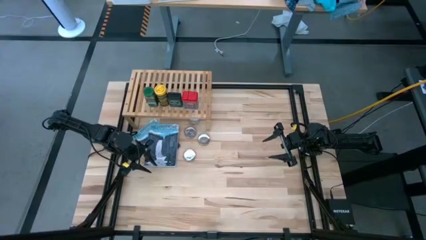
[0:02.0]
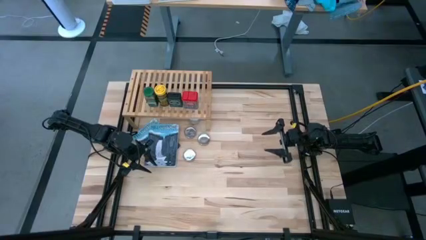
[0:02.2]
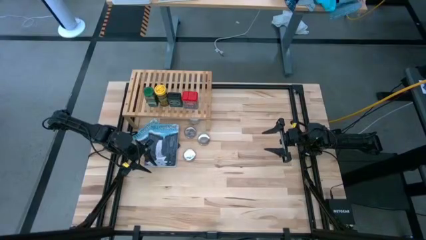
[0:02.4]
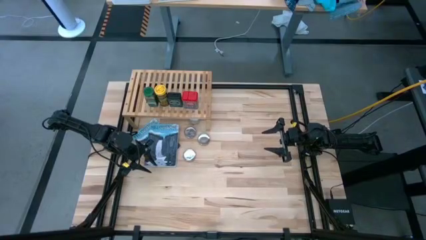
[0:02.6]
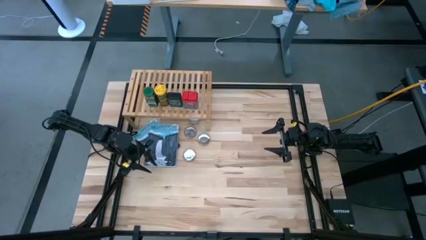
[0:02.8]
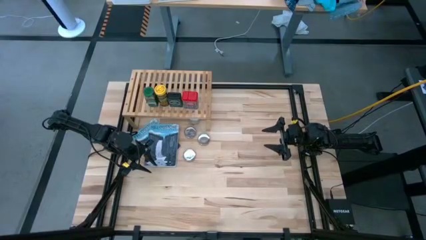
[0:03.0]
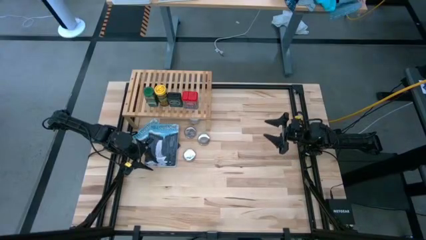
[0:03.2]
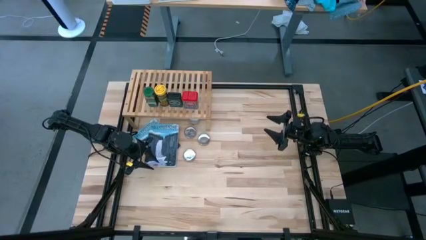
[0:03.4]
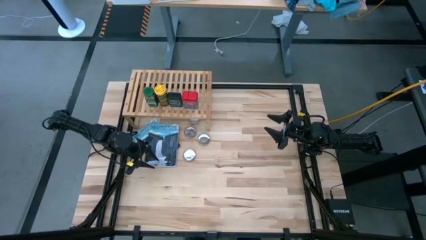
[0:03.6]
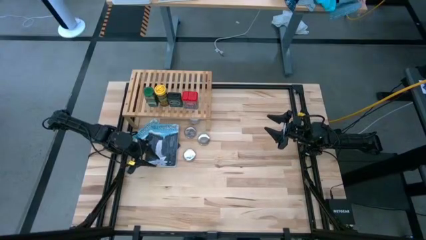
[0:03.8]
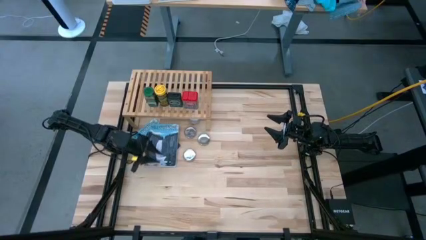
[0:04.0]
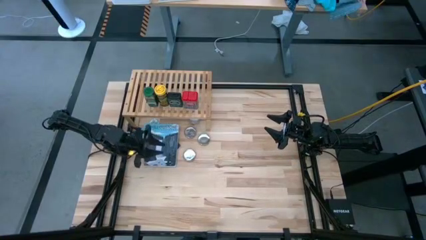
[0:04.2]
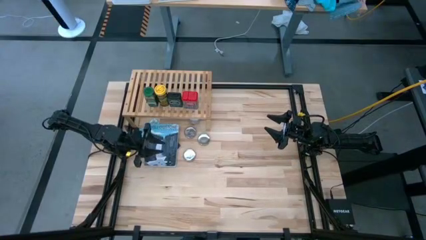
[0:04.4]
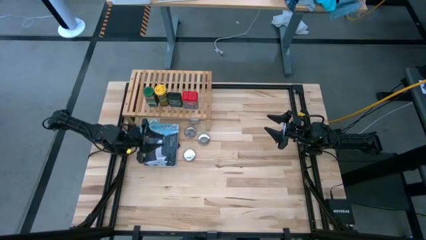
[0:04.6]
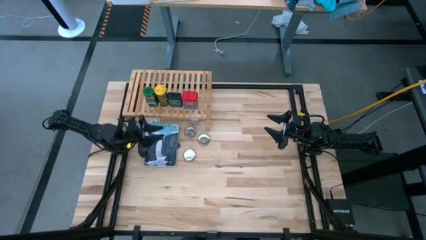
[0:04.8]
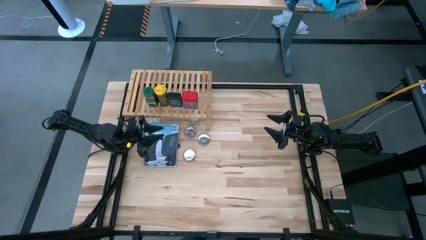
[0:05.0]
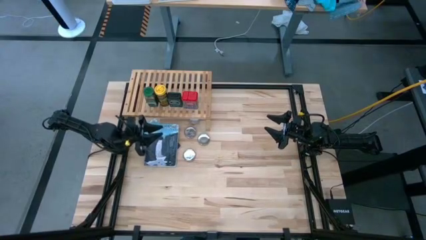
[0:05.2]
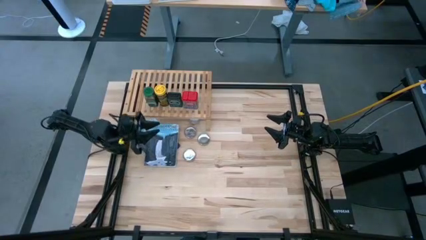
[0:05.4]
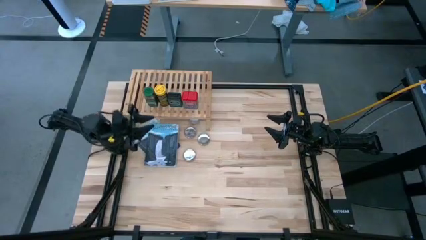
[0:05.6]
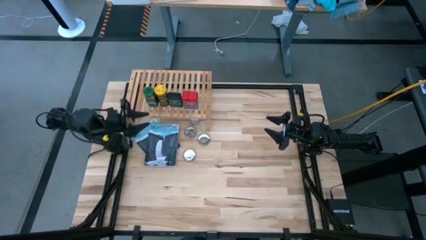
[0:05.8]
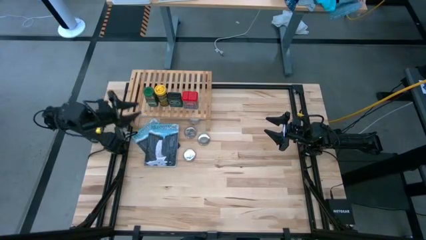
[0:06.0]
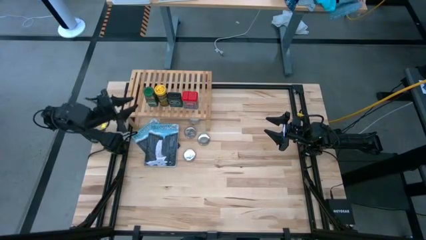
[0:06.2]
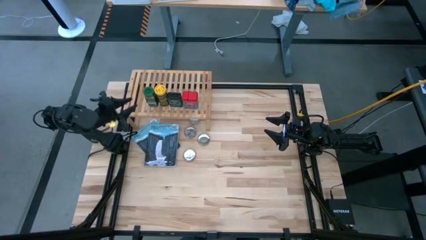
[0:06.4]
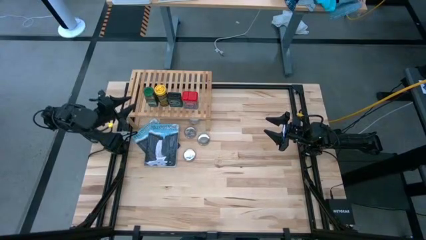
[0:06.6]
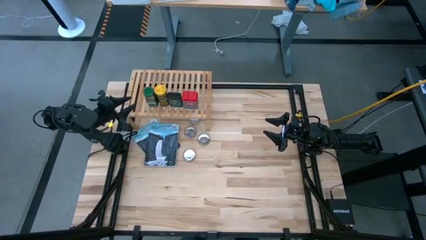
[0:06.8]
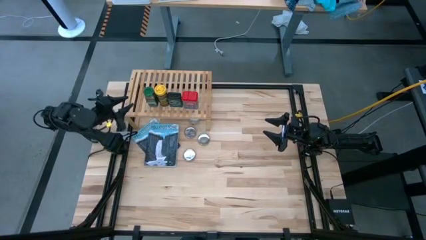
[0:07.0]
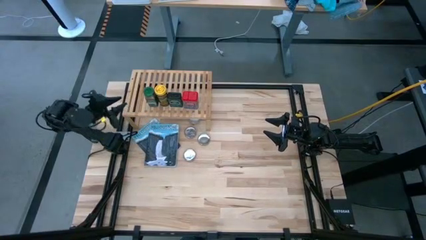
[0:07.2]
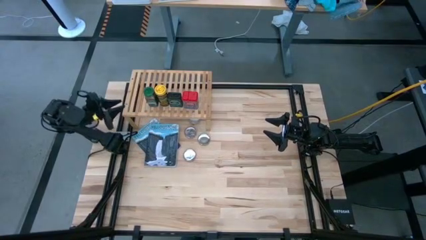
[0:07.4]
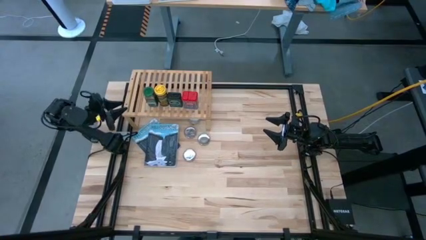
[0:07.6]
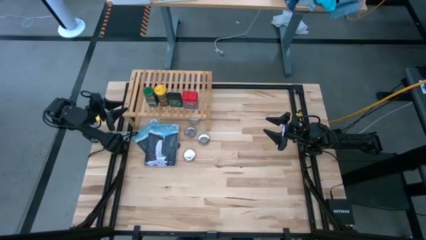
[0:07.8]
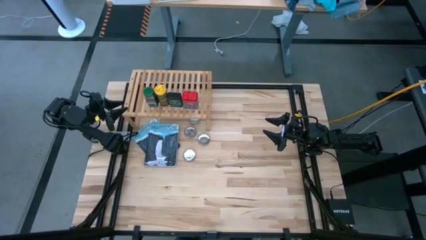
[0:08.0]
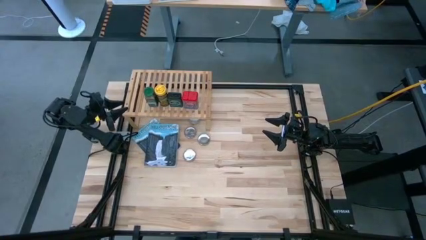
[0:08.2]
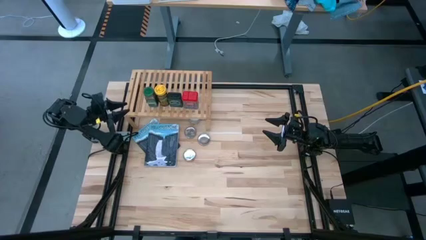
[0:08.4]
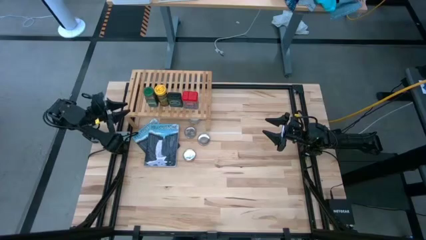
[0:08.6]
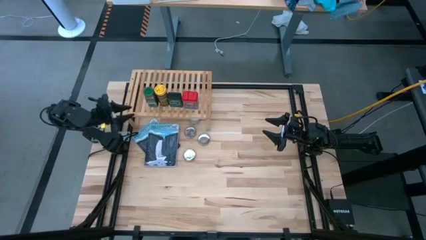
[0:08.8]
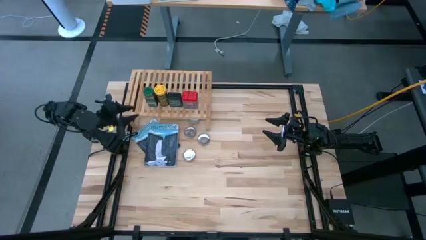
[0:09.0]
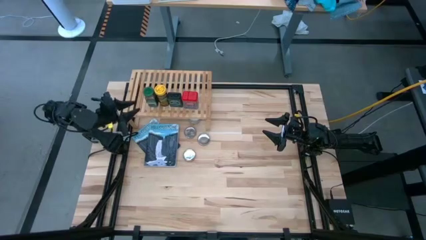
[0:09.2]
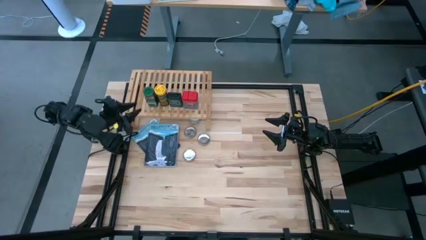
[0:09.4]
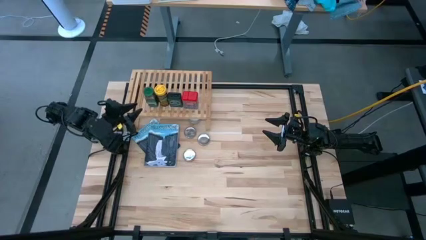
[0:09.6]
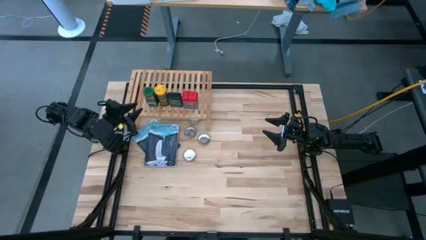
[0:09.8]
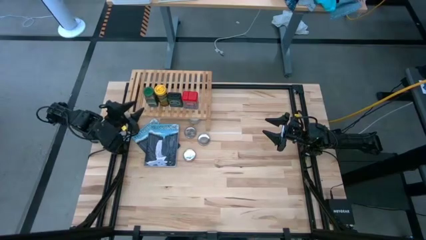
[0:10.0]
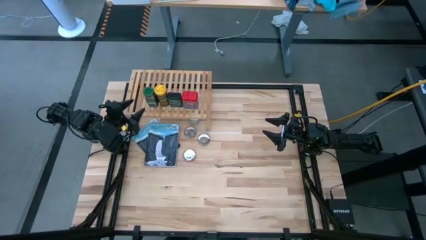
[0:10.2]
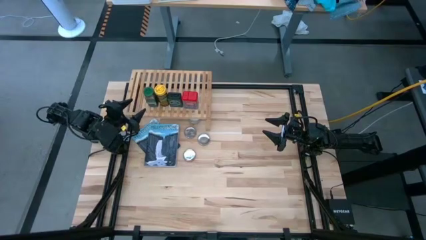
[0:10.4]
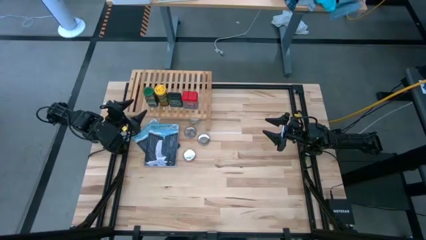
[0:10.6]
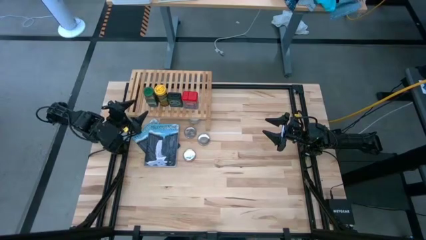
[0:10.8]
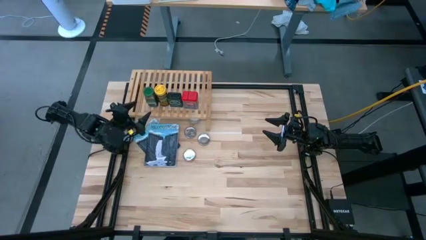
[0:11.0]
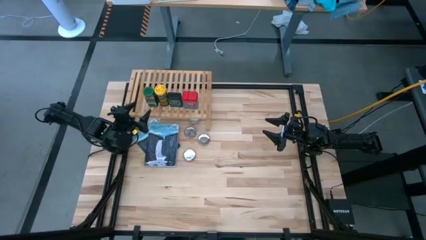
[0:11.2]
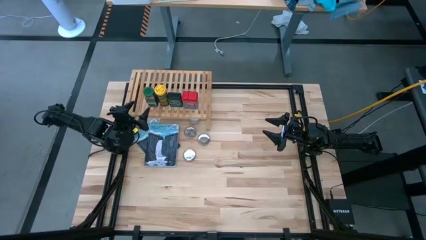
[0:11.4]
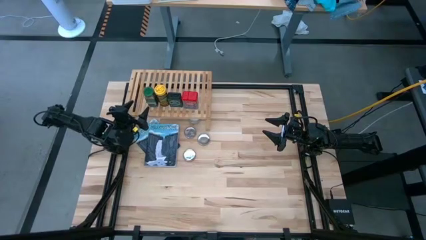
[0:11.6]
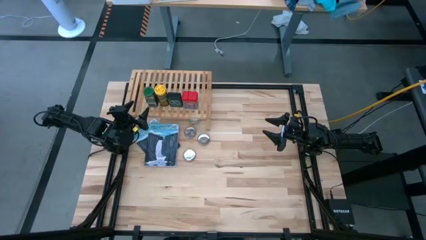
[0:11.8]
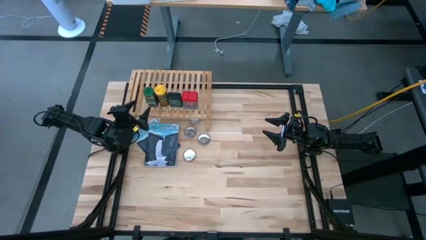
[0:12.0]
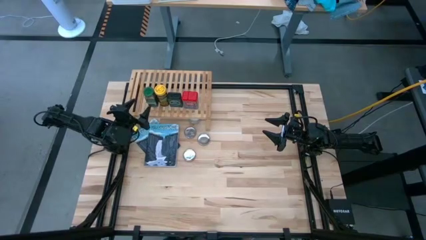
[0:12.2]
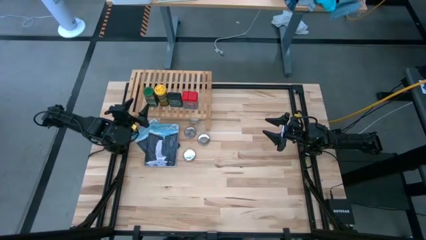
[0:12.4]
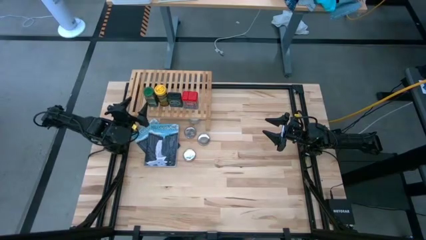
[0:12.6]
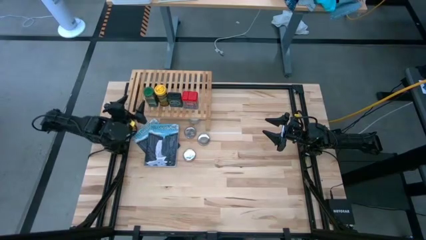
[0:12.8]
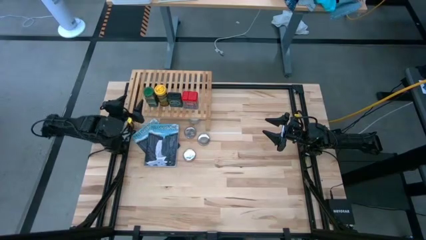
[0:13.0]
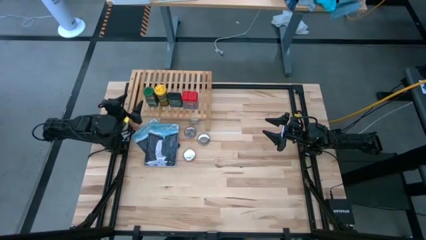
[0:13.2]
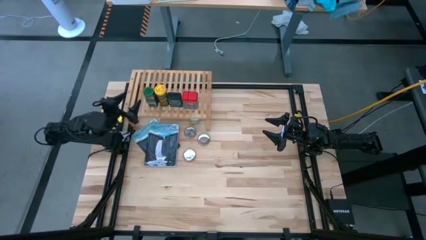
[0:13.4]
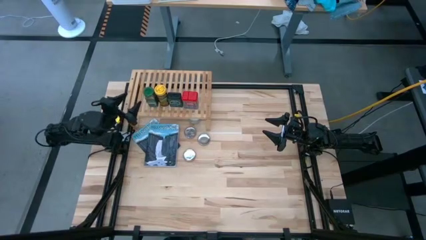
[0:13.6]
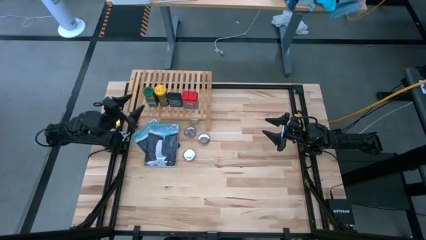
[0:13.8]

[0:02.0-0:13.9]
Task: Shelf spices
Remove the green seasoning bottle from the shelf

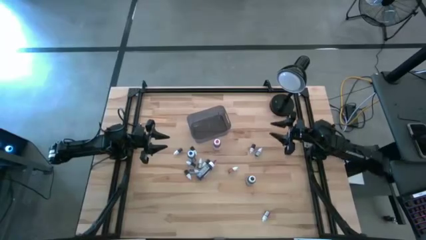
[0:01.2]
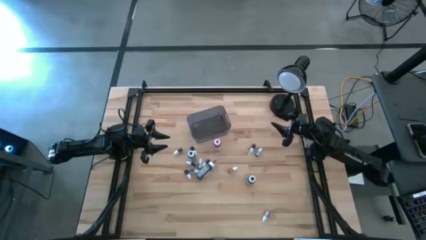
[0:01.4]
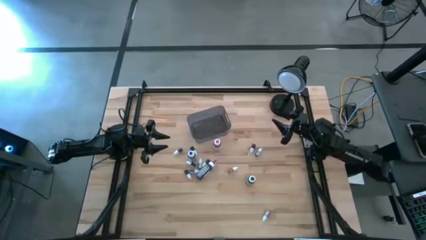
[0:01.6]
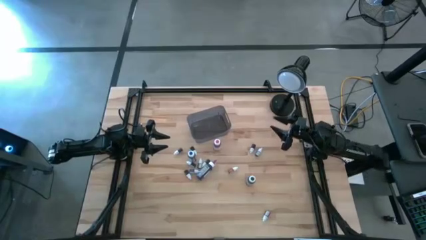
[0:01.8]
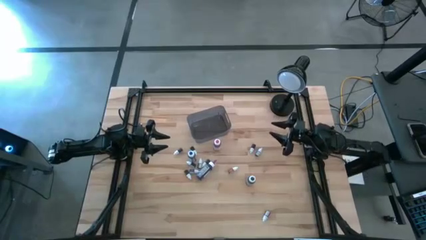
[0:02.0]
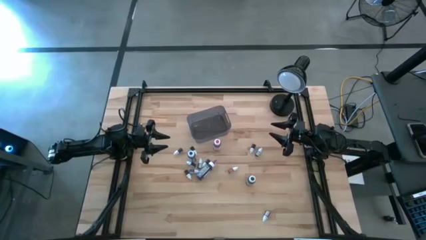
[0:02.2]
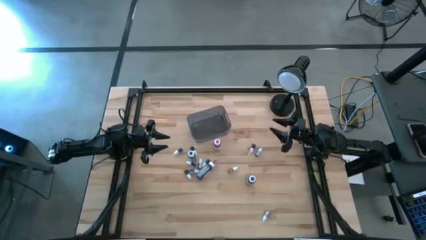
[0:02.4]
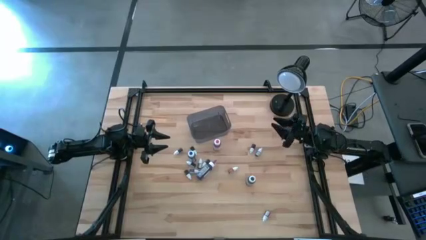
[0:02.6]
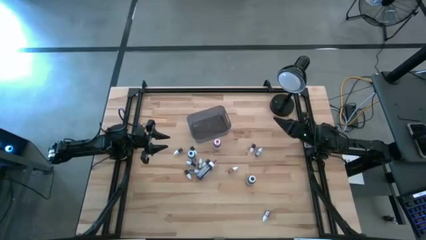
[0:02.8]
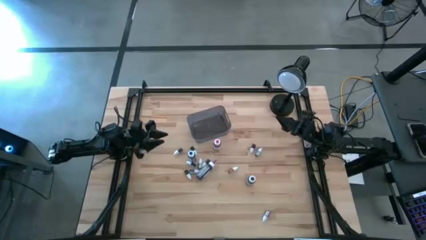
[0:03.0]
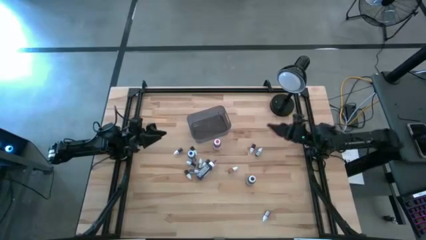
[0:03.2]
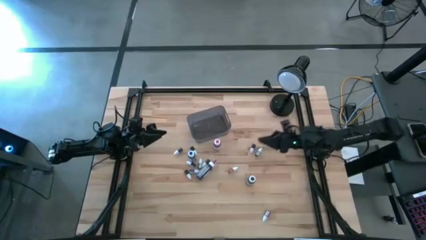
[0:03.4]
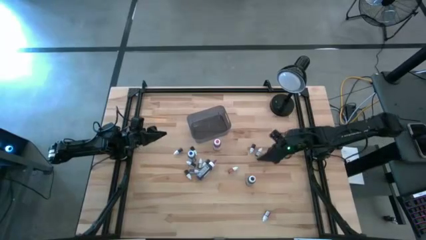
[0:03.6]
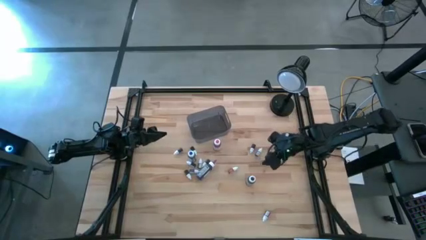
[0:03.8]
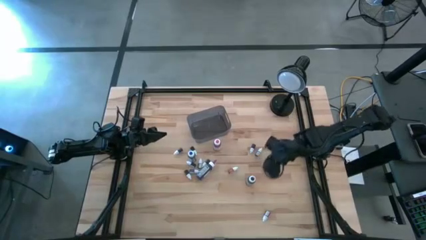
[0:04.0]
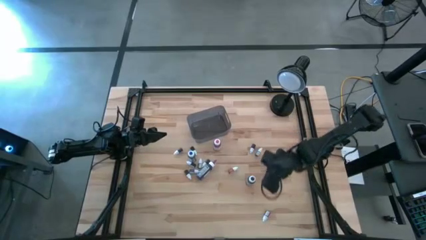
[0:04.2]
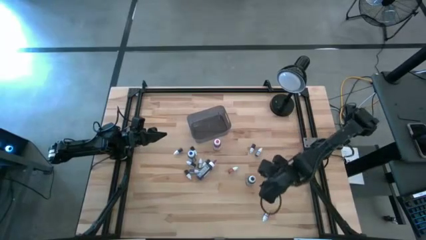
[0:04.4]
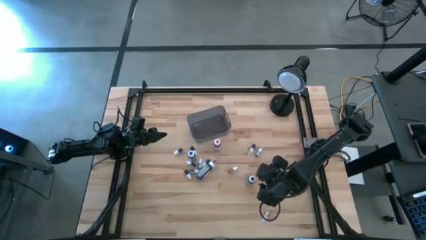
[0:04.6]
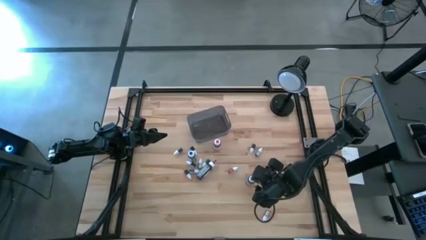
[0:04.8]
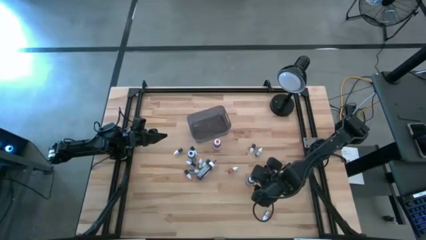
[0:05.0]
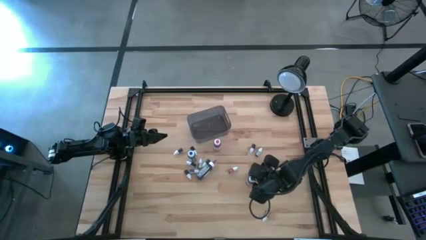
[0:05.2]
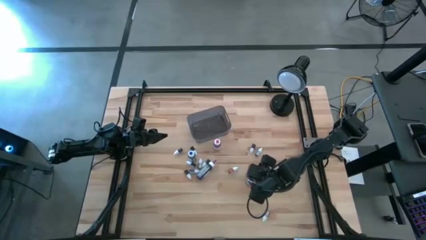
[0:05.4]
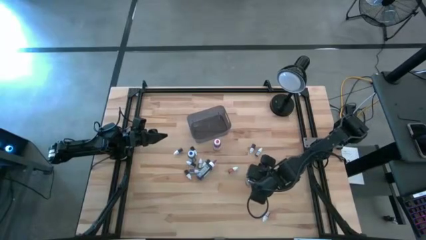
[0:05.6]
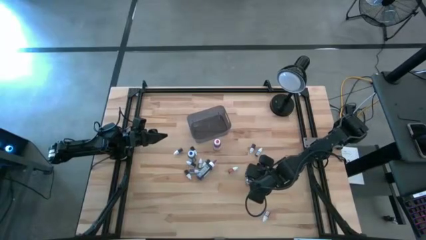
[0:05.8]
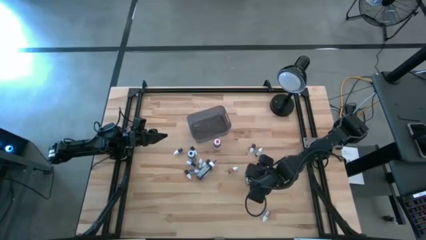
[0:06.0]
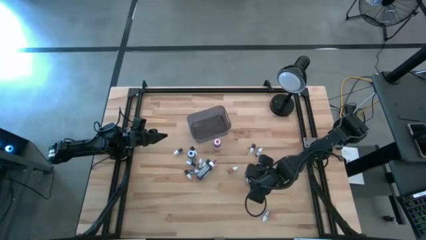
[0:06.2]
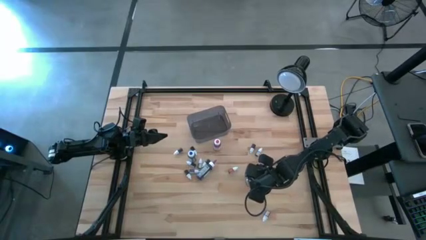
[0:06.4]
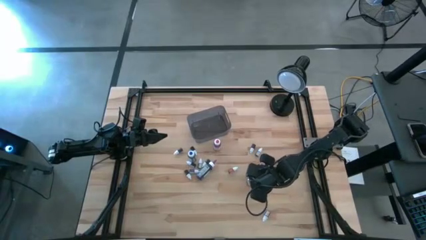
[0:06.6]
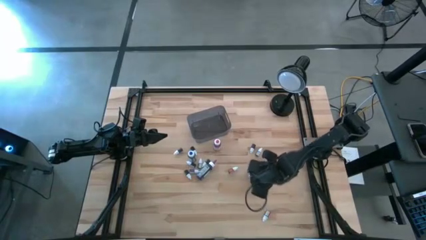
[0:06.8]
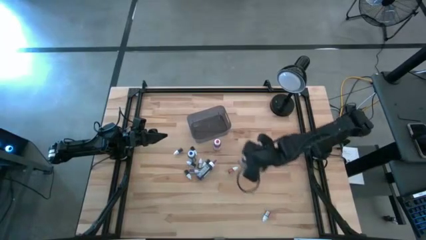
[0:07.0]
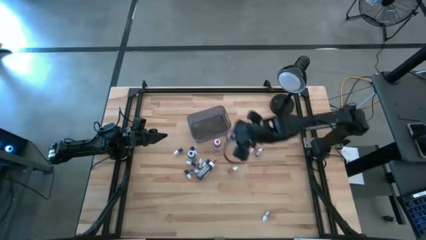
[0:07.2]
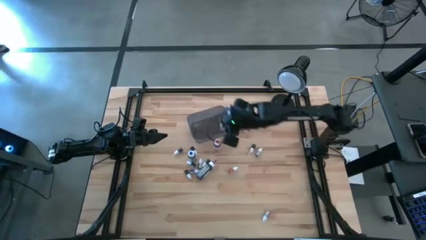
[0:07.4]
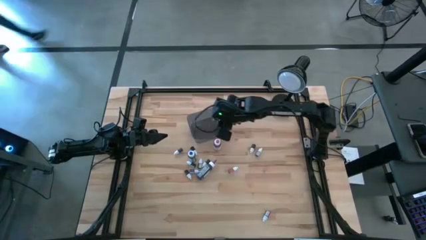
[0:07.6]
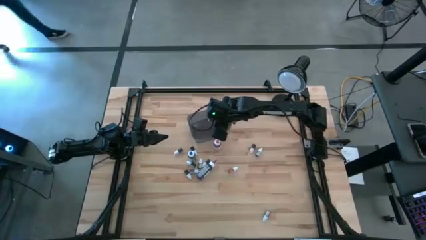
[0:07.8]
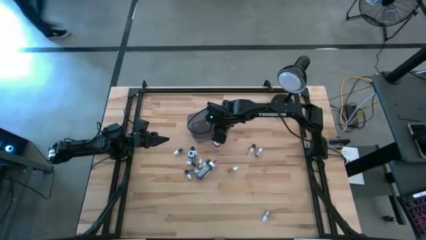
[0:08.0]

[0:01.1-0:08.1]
Task: Pick & Place food coloring
Put the large blue food coloring bottle into the gray bin
